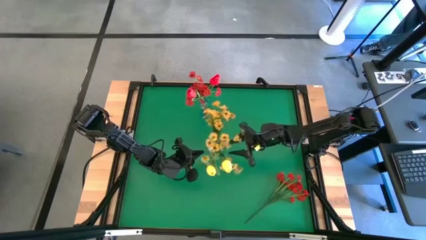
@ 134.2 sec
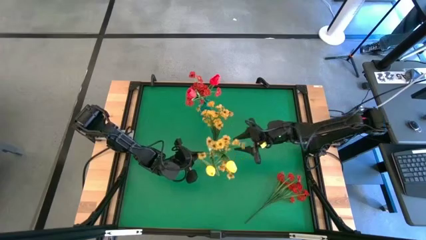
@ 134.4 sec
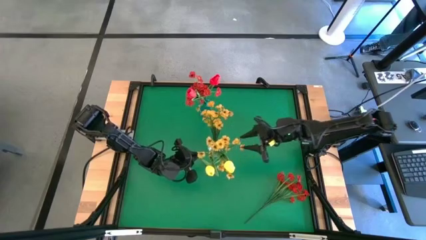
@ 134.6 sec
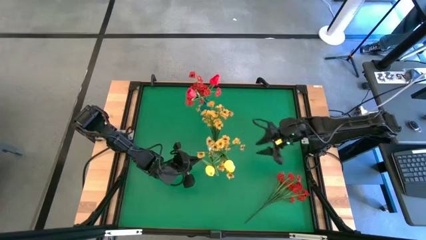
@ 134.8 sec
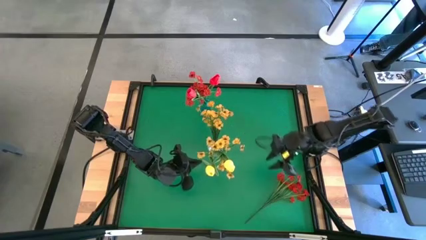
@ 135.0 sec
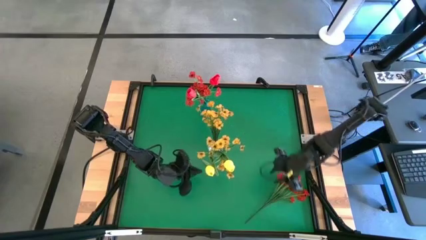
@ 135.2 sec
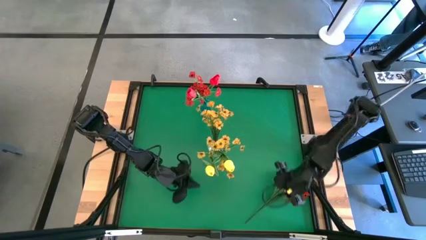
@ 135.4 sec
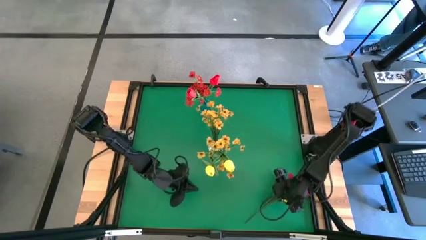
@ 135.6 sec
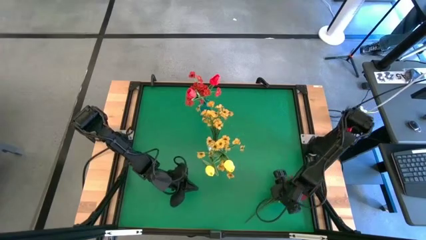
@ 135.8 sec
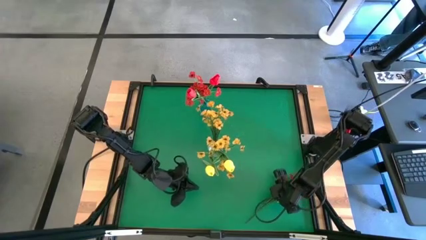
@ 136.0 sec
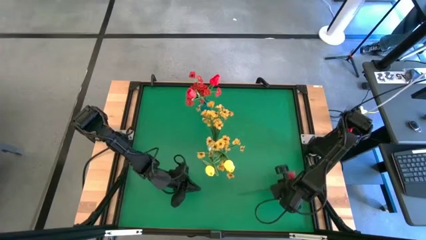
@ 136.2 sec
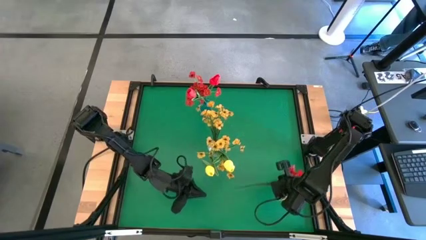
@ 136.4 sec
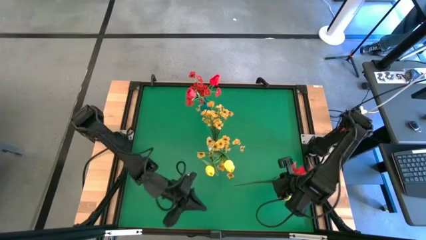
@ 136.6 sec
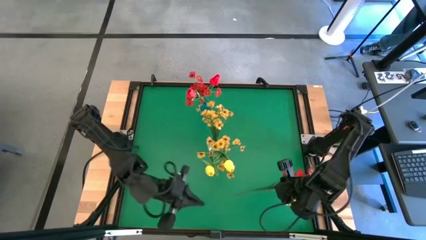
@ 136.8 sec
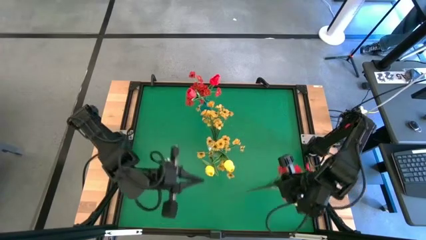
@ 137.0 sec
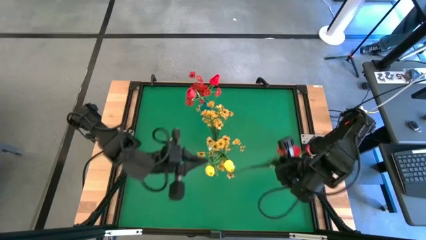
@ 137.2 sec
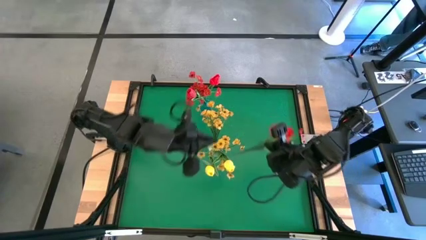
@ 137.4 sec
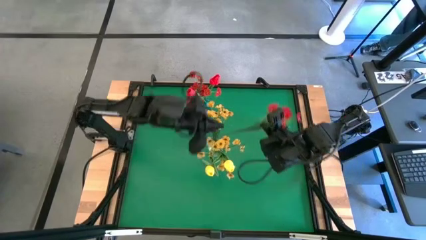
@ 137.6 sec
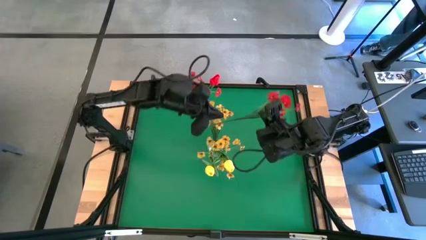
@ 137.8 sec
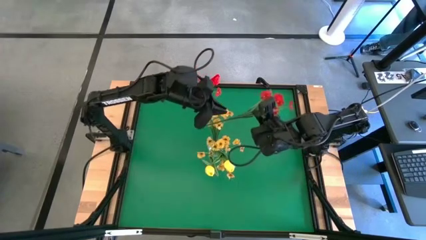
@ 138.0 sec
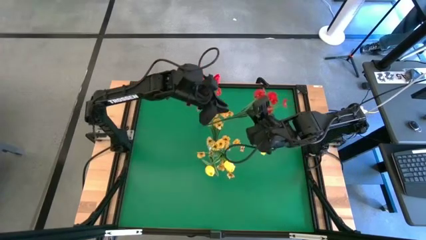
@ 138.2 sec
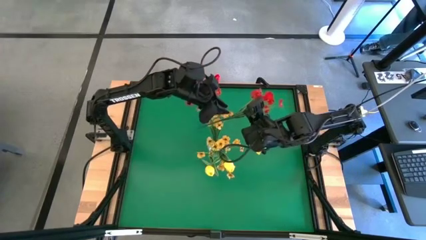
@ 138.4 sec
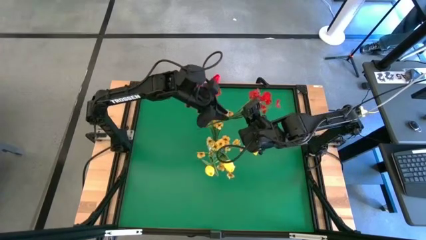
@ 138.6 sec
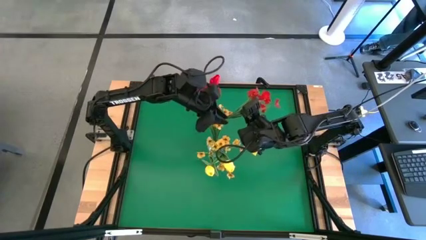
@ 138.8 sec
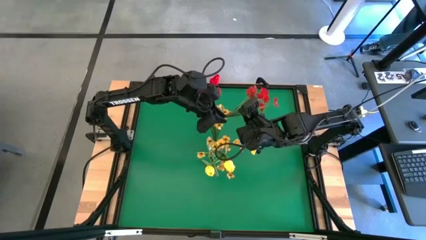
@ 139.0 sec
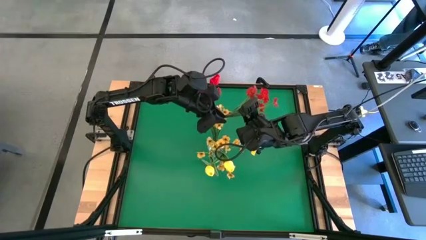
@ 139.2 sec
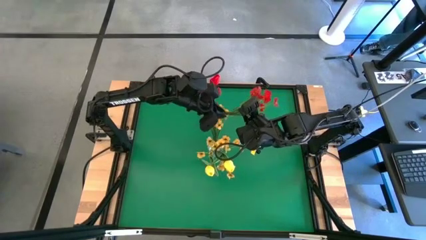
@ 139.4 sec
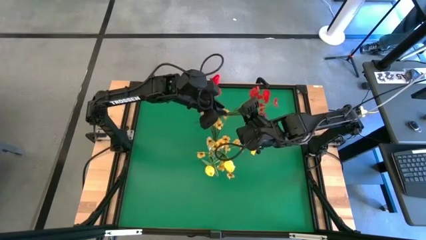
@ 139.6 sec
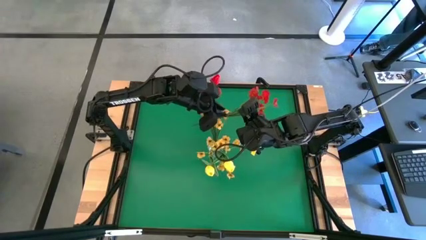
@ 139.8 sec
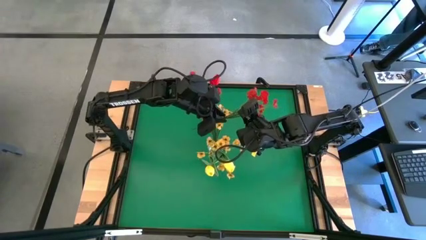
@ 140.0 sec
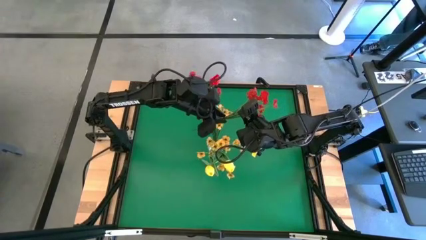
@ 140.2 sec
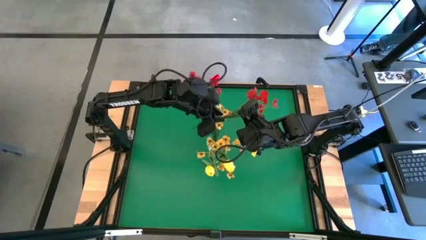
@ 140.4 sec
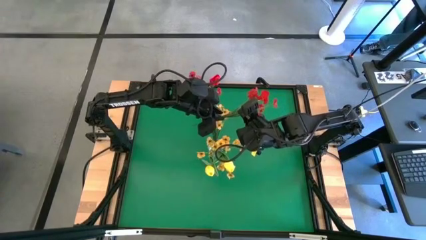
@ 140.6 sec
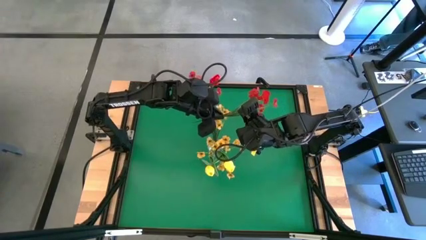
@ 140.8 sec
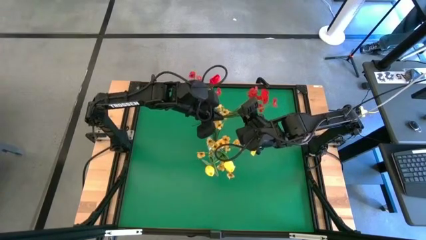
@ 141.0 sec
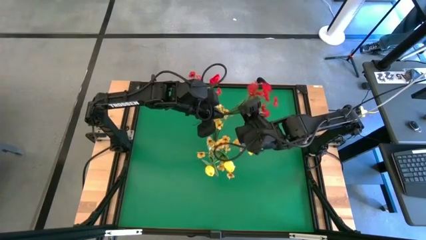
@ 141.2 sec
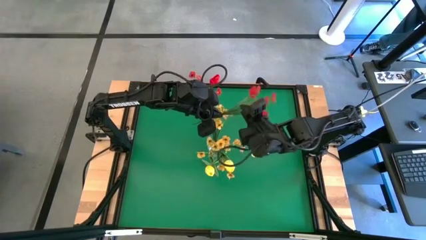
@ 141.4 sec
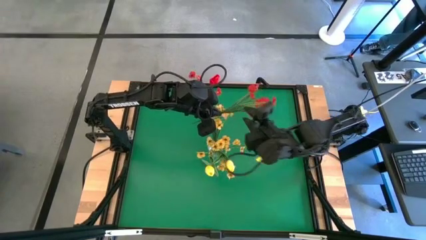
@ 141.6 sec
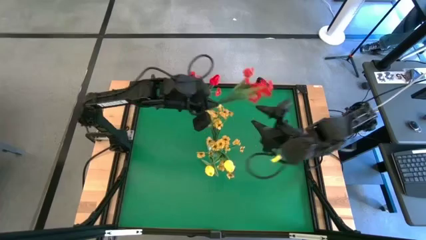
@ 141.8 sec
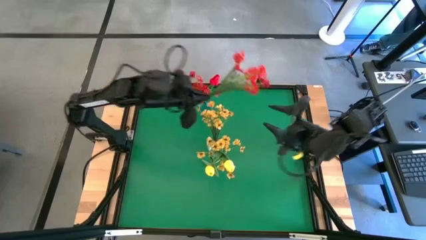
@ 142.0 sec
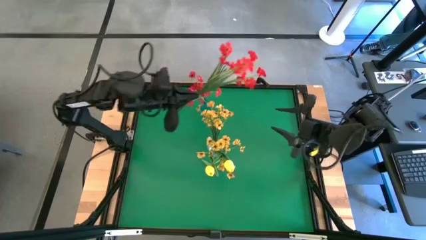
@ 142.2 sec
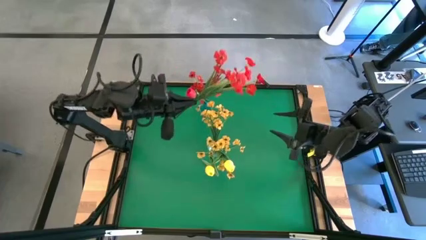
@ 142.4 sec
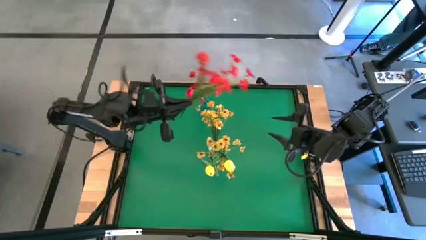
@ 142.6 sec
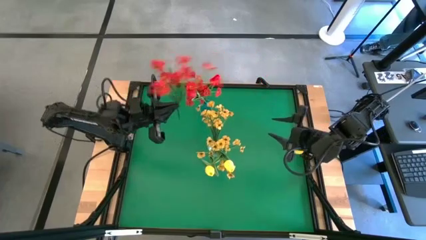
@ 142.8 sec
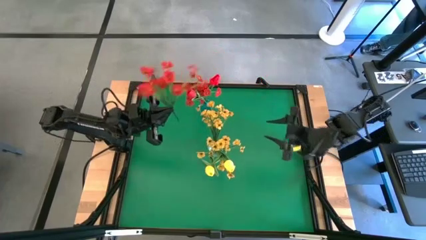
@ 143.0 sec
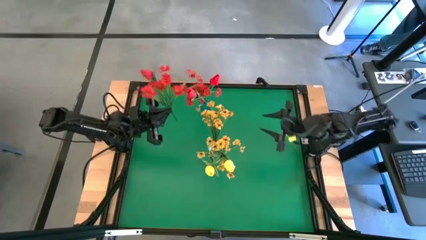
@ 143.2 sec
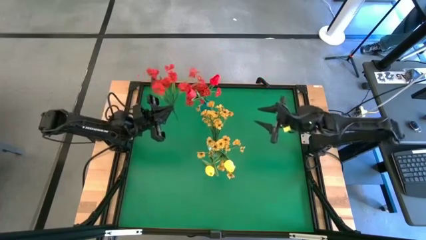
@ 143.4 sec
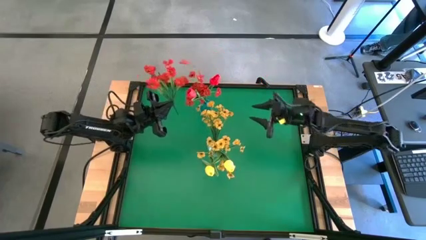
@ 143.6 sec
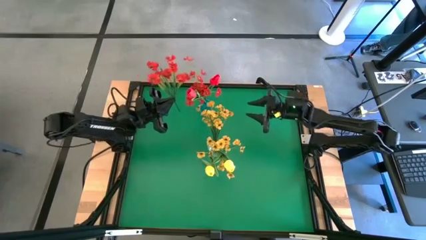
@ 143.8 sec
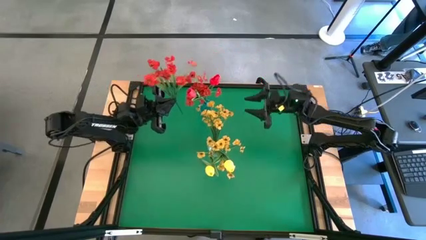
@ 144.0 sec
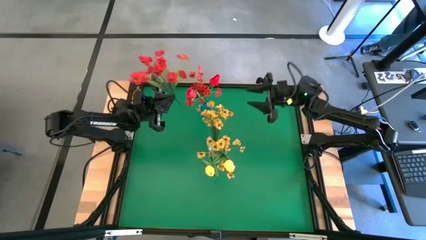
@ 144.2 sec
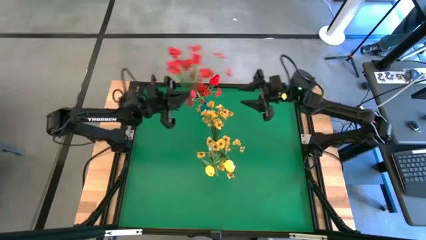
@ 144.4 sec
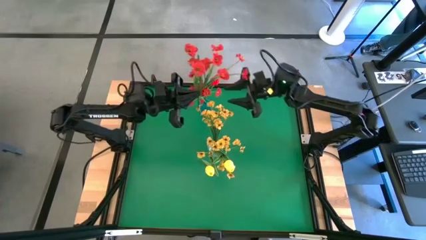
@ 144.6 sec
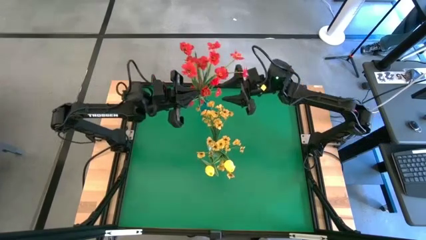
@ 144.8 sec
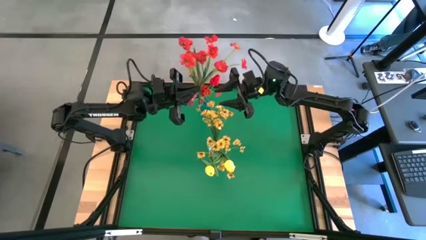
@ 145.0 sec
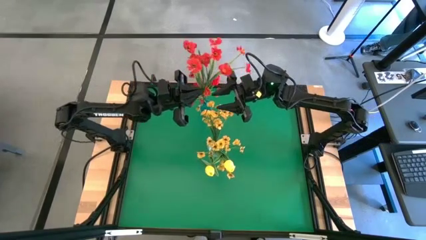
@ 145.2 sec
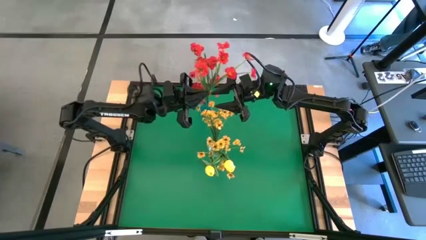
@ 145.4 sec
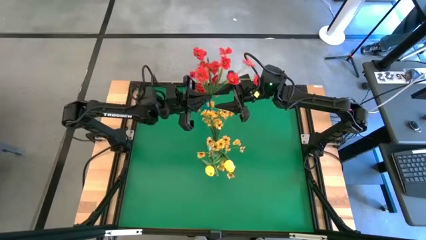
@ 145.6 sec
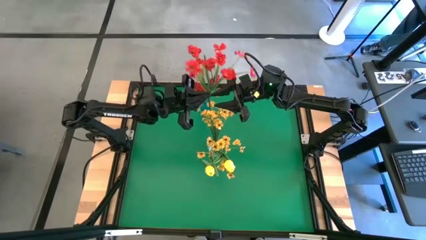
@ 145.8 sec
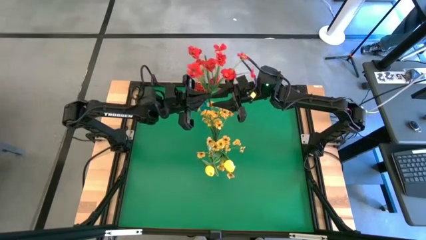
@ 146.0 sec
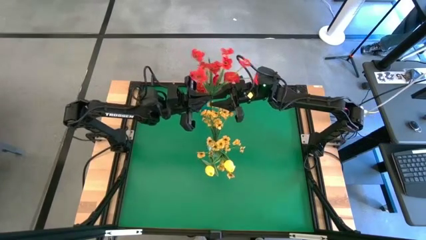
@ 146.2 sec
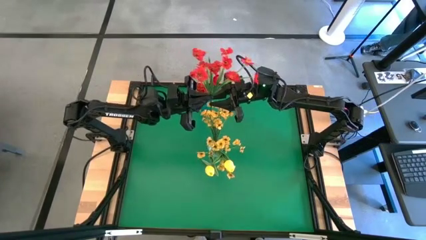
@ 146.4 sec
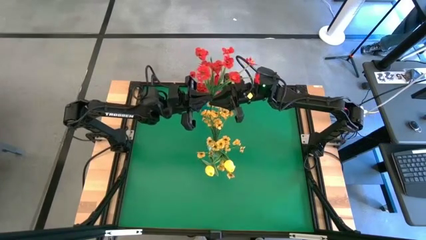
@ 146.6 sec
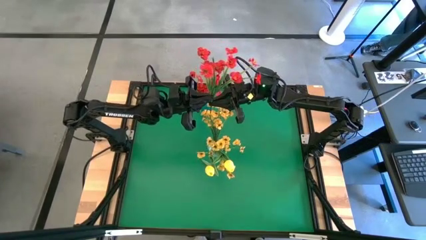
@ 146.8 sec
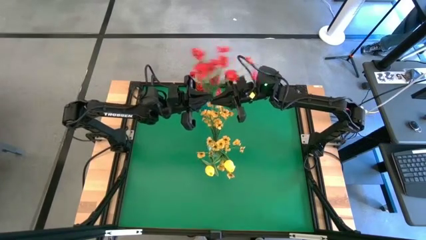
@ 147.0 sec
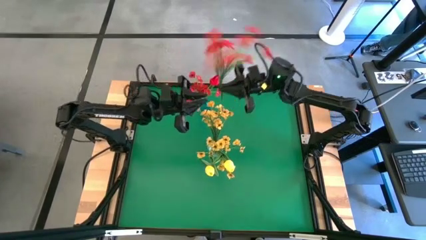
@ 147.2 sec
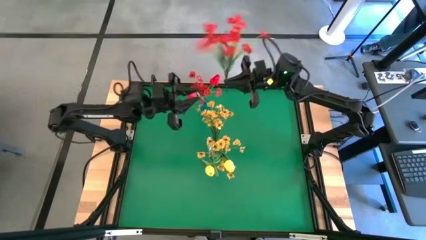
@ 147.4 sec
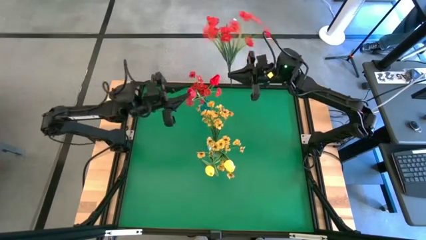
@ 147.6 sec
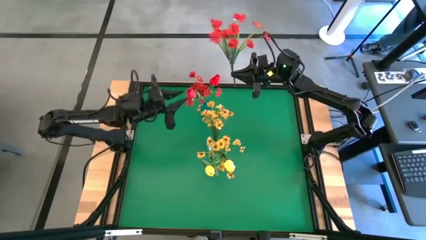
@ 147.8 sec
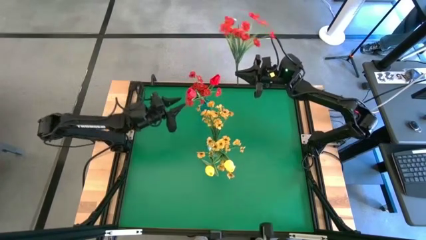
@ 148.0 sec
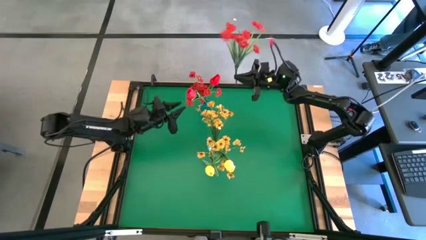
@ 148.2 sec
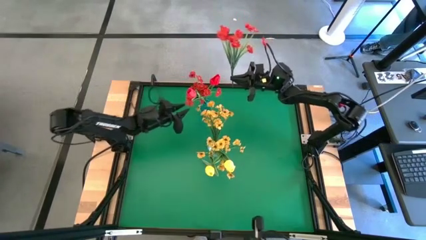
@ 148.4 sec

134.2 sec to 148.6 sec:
Task: Sort flowers into vase by color
Put the red flowers into the blue vase
